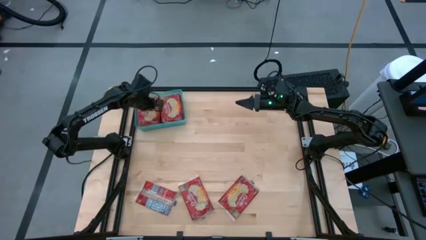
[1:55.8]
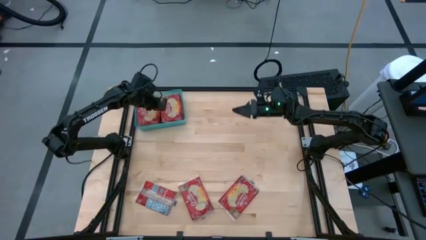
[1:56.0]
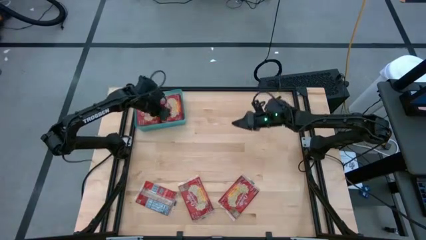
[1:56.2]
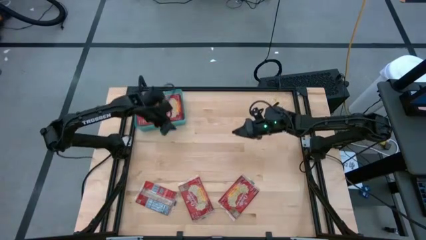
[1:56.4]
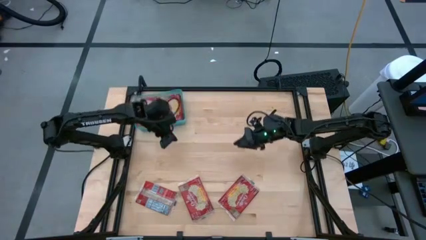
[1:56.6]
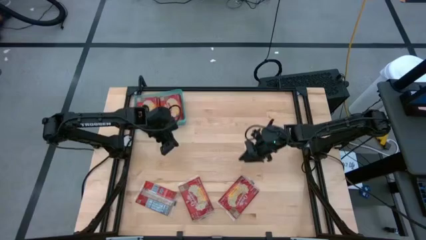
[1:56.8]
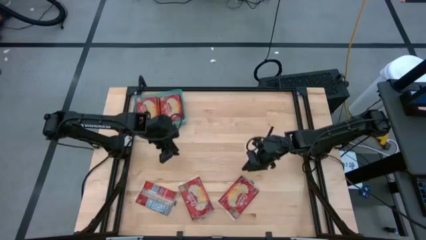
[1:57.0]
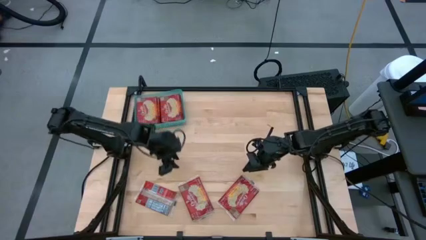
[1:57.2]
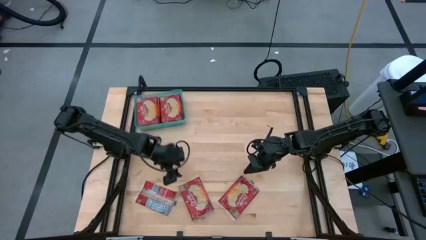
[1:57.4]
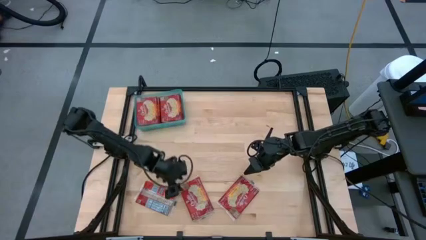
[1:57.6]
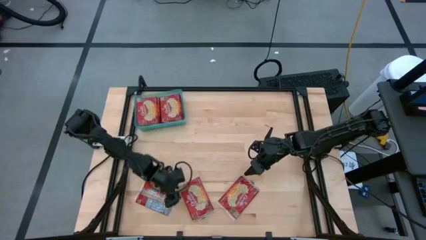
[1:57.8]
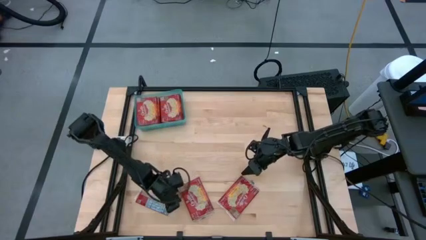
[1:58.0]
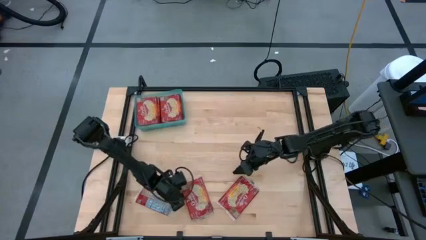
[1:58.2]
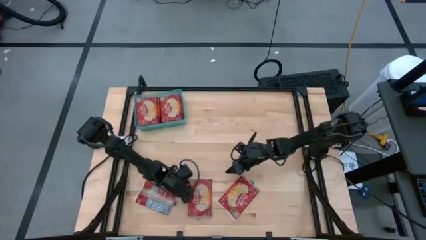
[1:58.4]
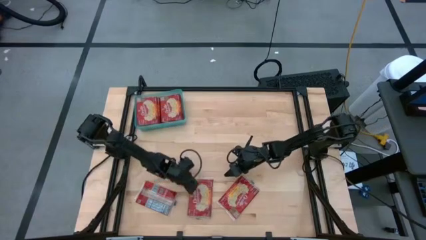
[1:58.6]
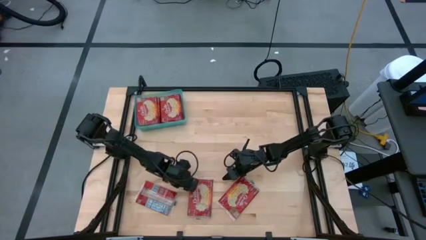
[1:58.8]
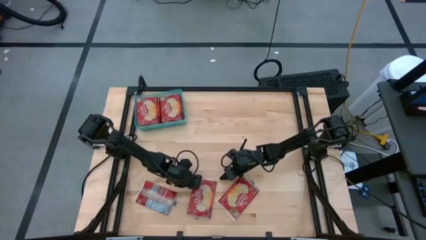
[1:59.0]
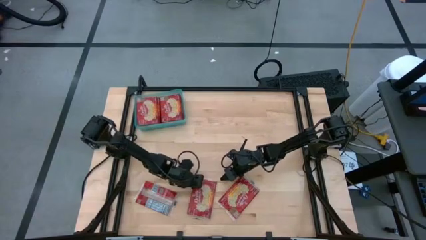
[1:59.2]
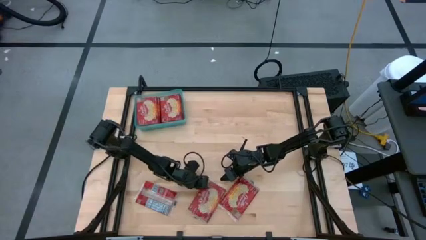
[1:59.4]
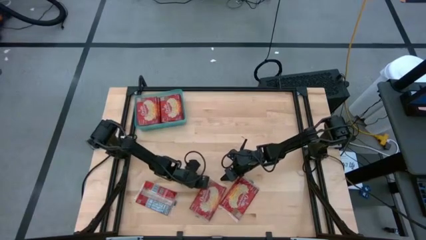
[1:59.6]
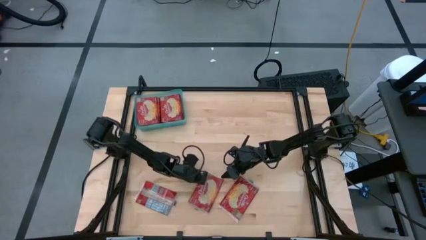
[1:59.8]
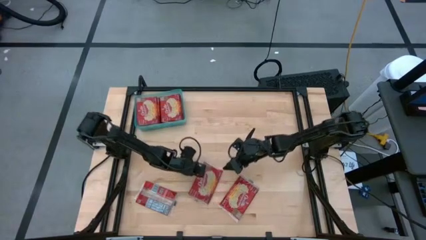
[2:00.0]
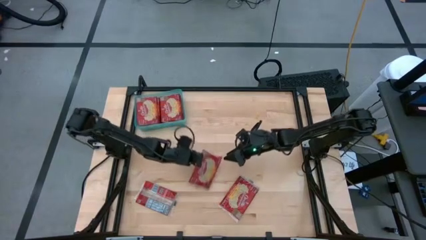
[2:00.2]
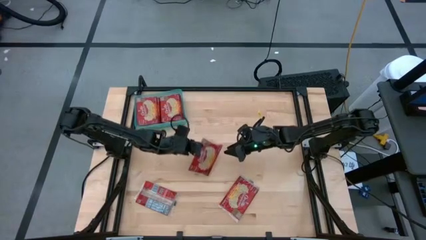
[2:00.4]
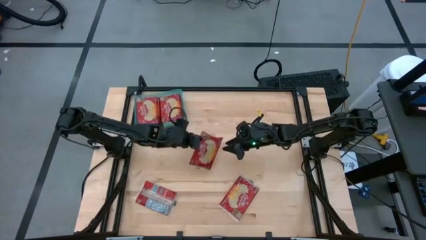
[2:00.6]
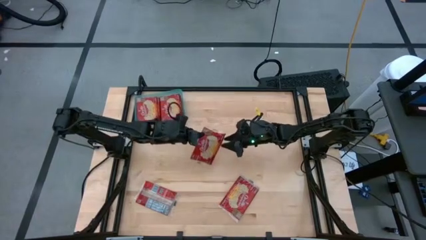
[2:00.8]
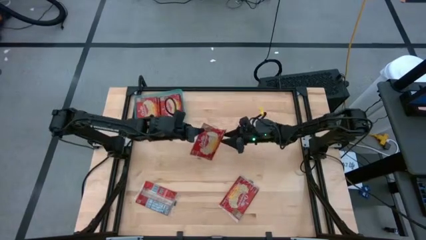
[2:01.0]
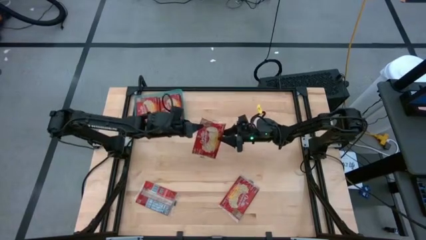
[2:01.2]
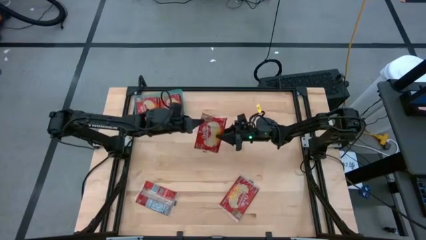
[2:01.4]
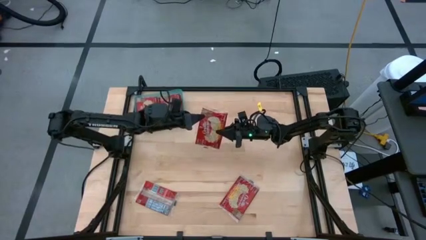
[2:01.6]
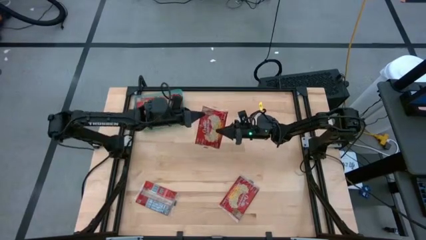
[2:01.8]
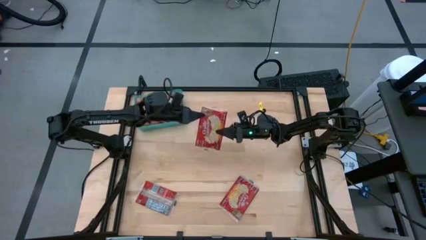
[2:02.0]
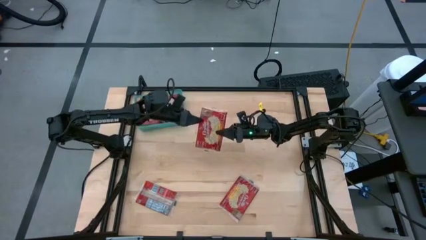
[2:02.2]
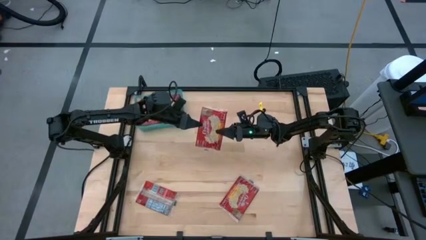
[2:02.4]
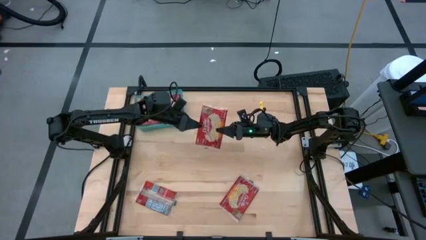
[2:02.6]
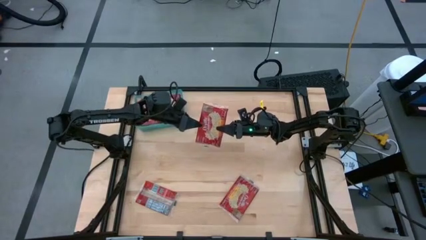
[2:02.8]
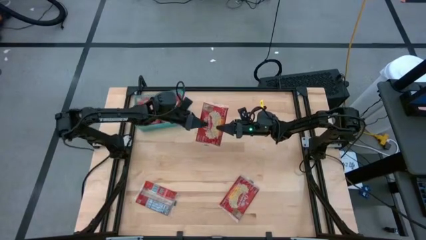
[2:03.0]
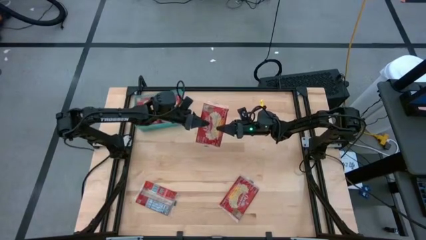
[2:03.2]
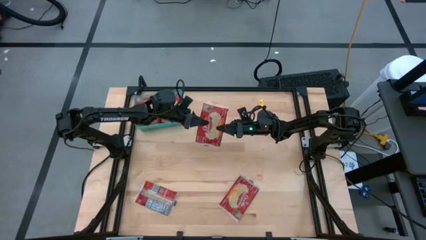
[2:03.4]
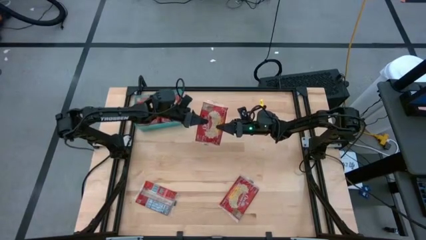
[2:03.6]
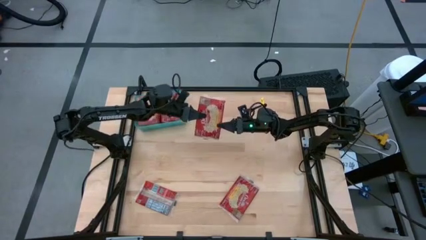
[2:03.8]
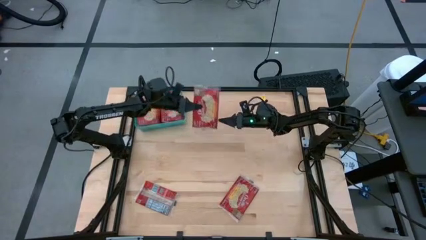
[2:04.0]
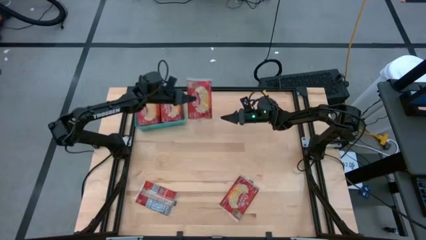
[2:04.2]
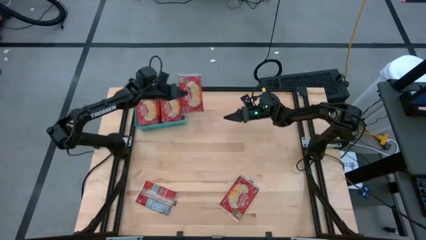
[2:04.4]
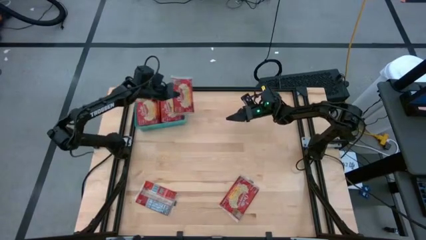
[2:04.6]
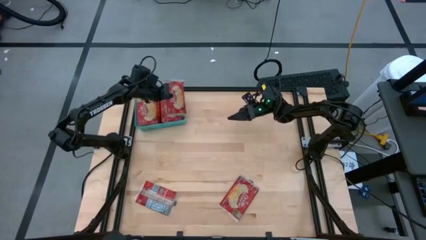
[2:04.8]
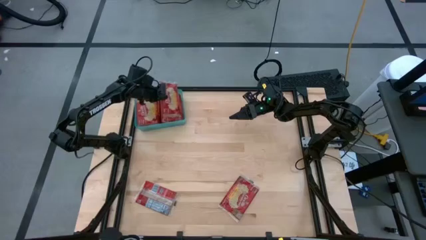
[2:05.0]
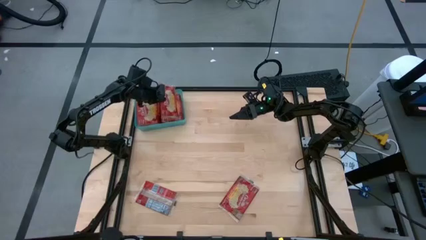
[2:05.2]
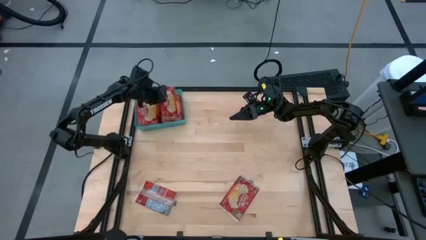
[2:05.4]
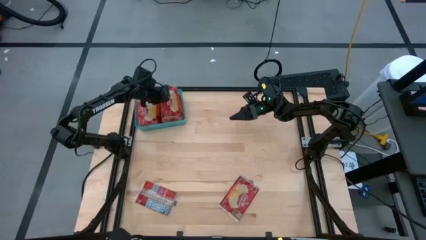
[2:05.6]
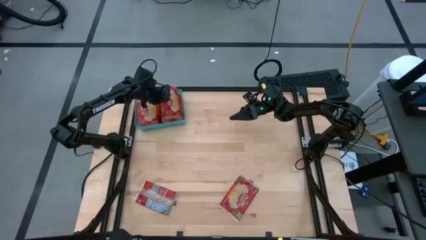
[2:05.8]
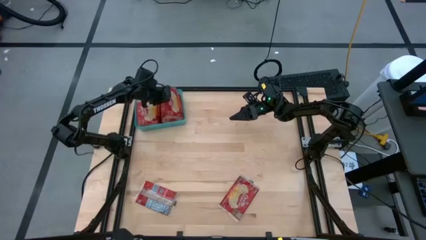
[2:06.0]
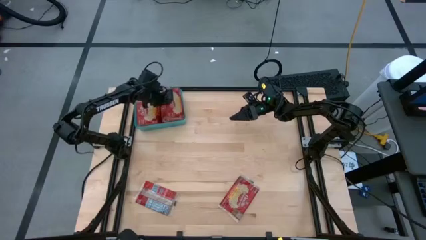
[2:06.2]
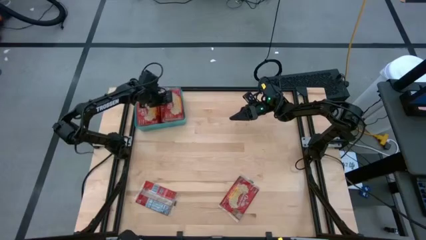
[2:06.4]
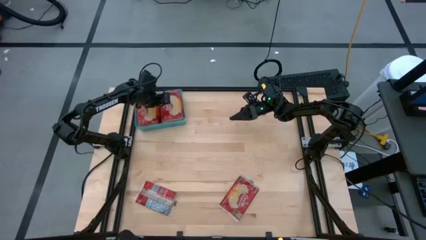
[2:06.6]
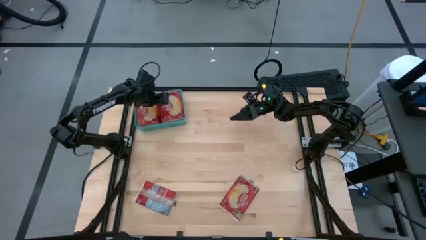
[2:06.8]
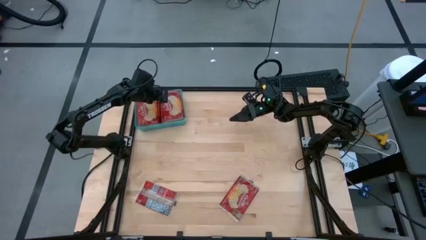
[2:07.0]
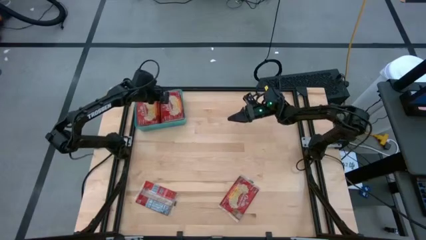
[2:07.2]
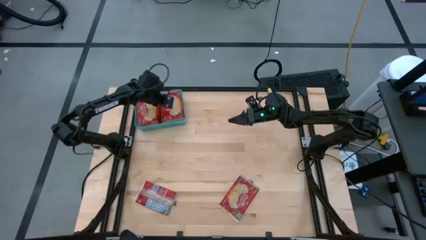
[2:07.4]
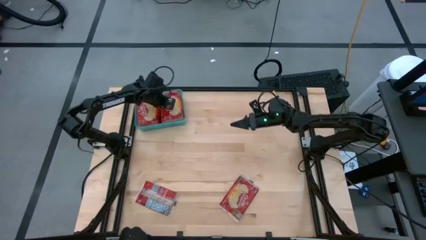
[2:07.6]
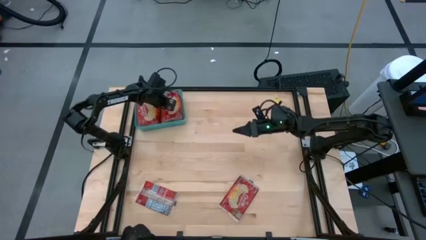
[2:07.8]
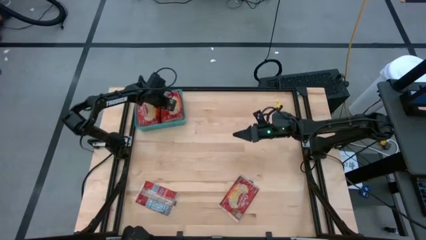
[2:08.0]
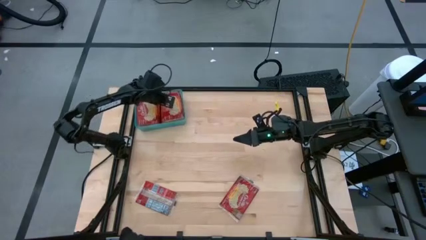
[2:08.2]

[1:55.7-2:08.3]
Task: Sort popcorn bags into baskets
Put the red popcorn bag into the blue bin

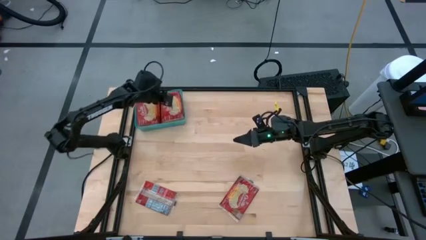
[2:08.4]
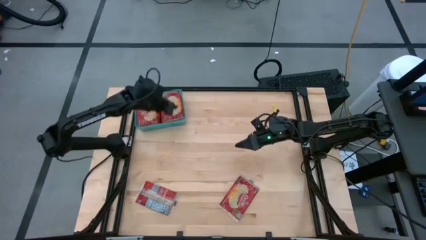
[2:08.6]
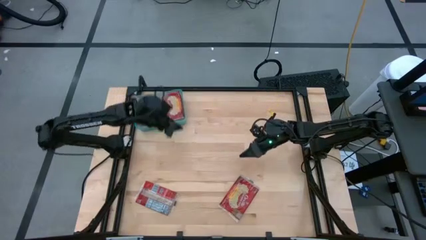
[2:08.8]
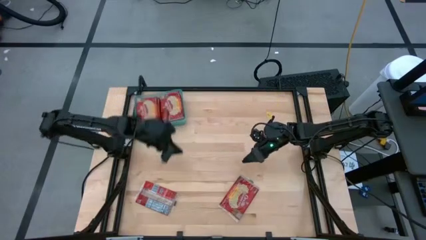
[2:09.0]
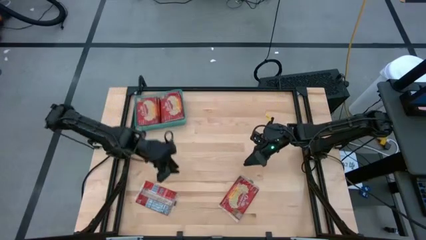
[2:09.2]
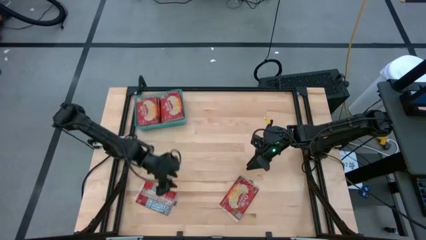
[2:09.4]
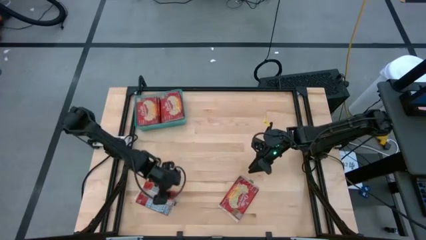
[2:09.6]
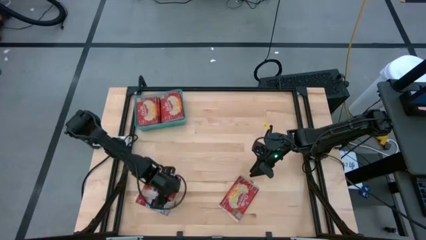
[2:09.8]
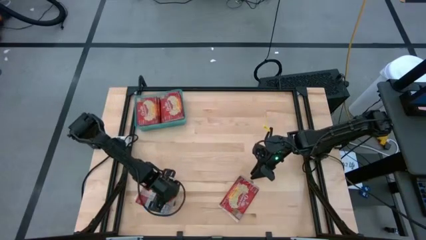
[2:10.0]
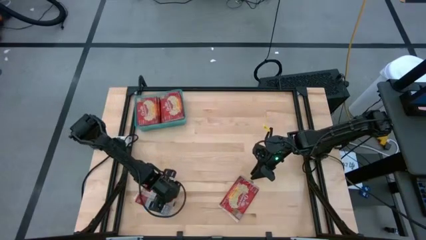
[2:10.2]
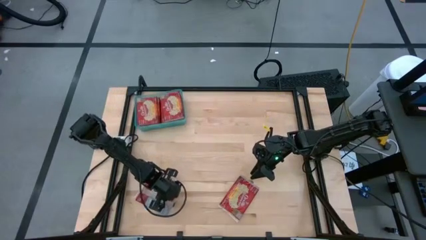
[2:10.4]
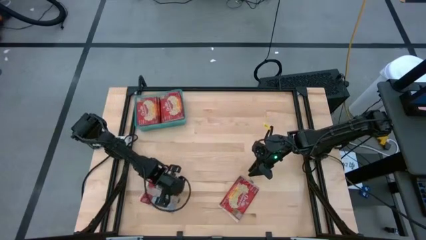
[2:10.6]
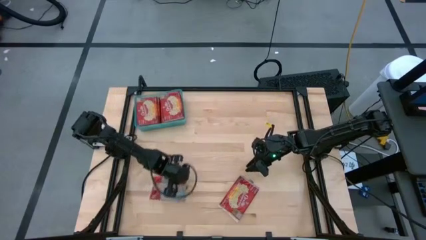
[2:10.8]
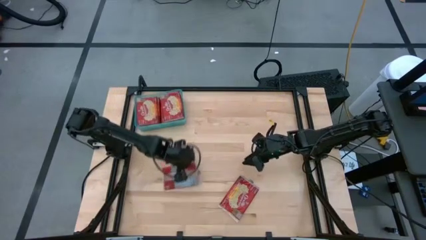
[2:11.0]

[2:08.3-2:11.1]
Put the red popcorn bag into the blue bin

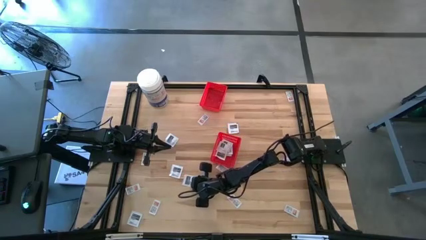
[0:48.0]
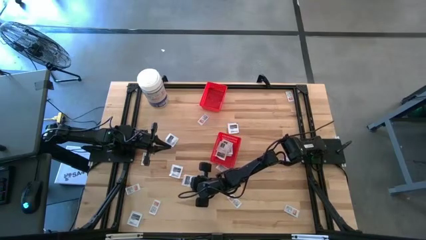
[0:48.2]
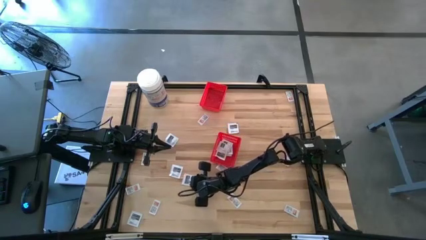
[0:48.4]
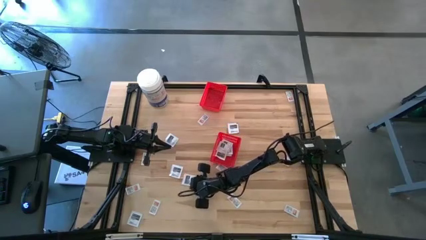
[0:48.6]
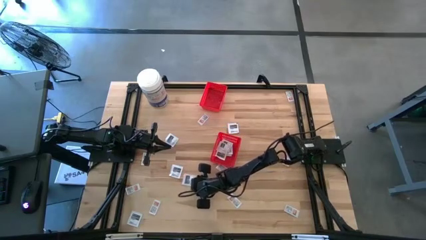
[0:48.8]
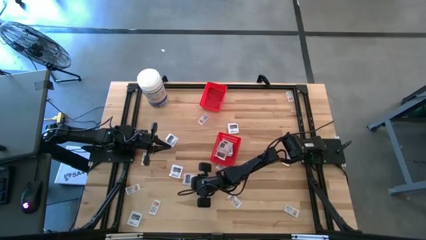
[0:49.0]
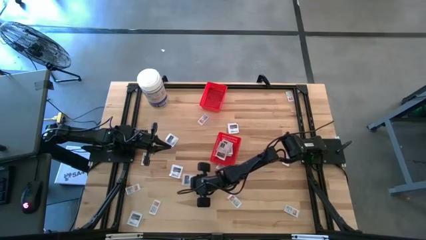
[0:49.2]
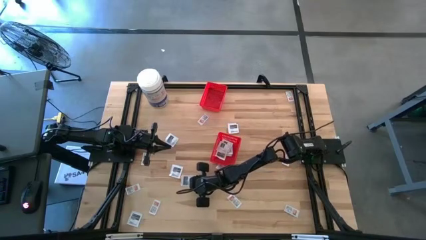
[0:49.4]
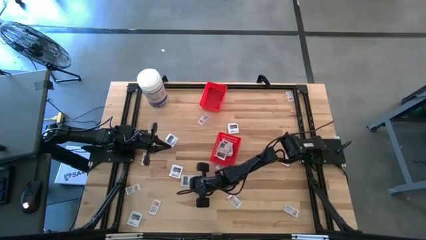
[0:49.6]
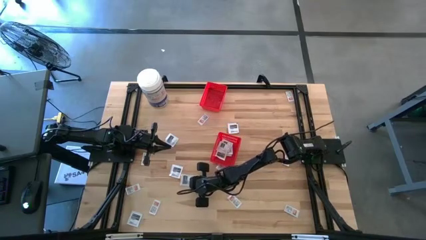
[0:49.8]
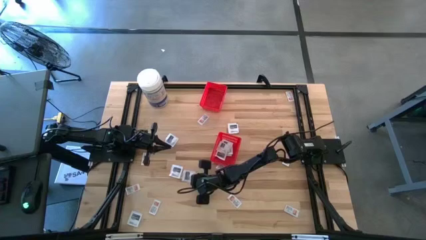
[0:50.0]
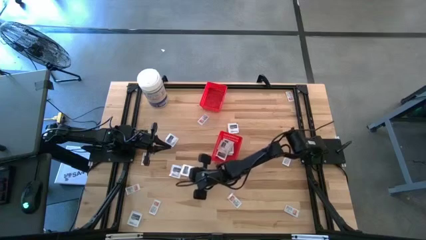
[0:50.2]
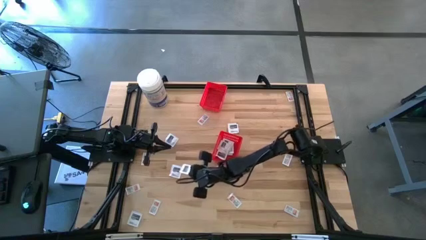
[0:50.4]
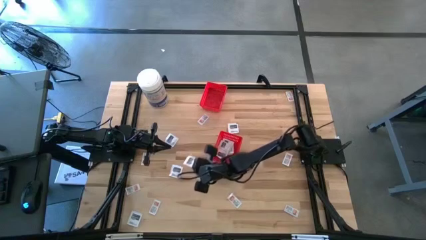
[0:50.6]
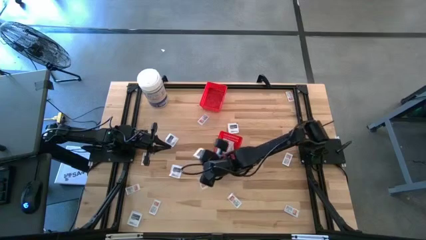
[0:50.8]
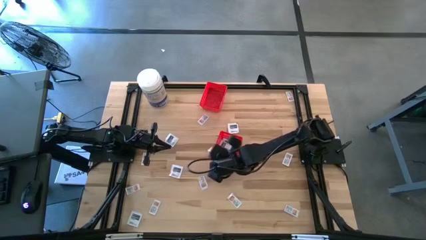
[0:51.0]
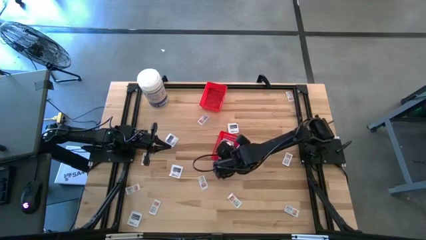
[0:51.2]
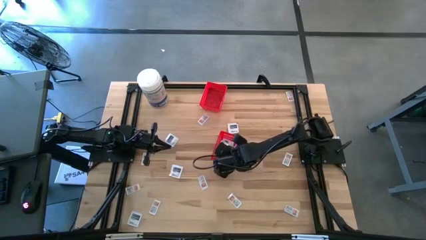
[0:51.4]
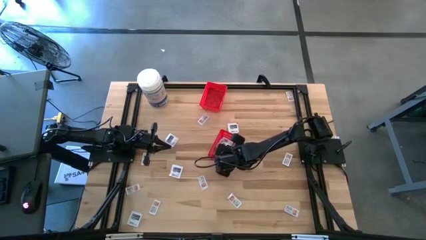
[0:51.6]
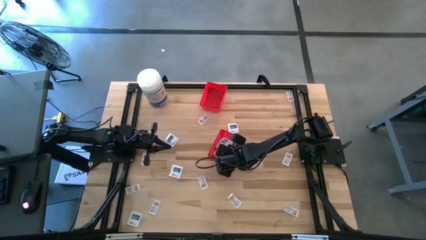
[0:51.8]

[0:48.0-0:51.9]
Task: Pick & Place First Aid Supplies
Put the white towelette pack into the bottom red bin
